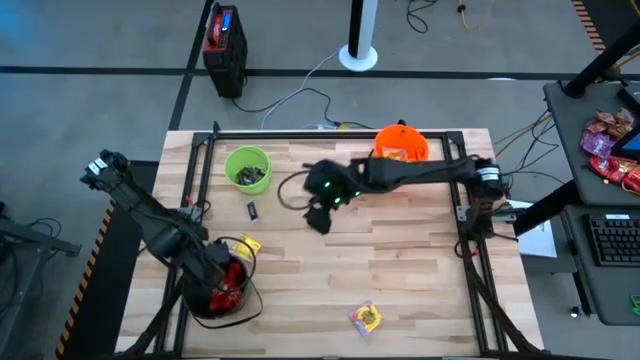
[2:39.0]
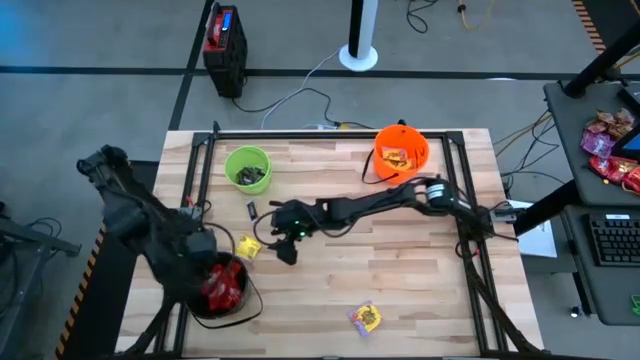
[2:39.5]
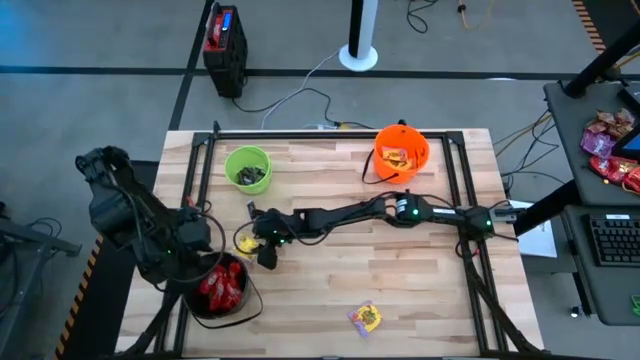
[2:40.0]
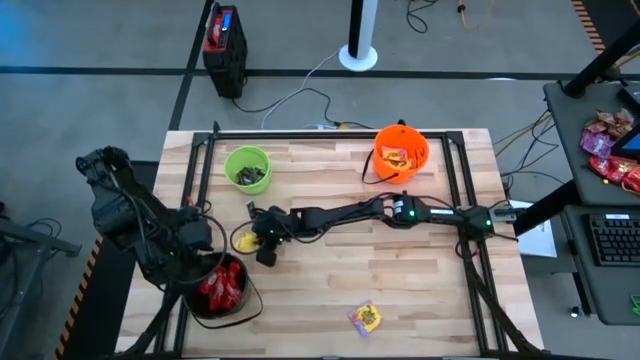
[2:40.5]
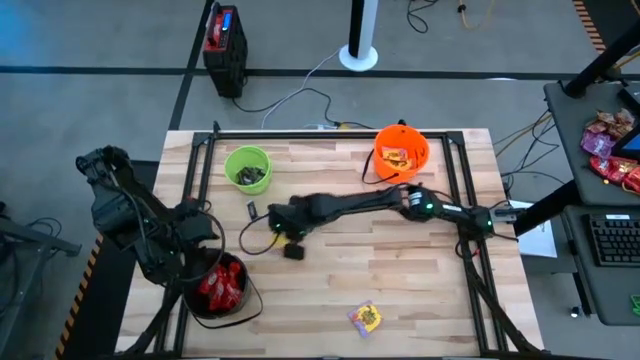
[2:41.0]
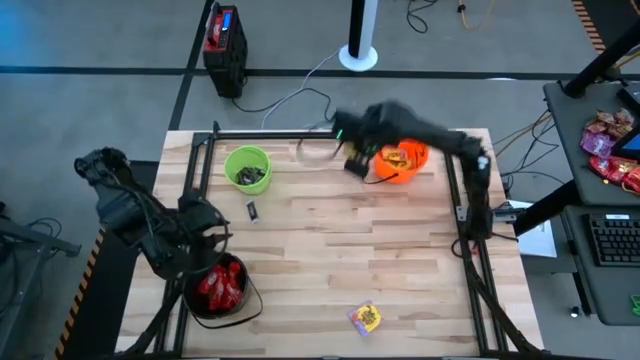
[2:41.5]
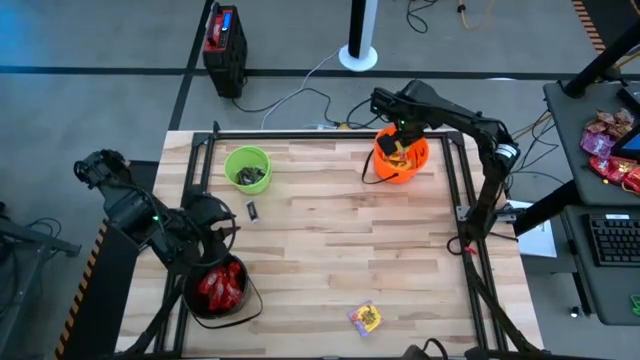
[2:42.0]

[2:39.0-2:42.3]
Task: Sort candy by brand, put in halloween buckets
Put the yellow candy into the orange bucket

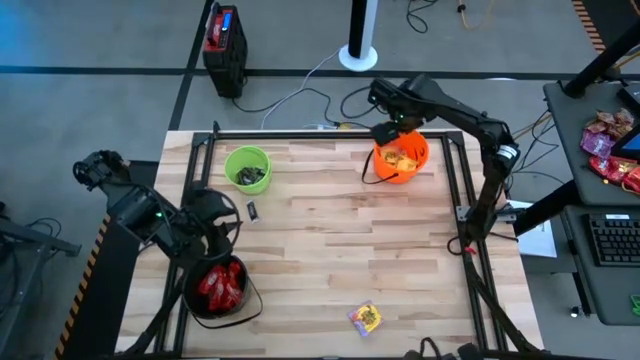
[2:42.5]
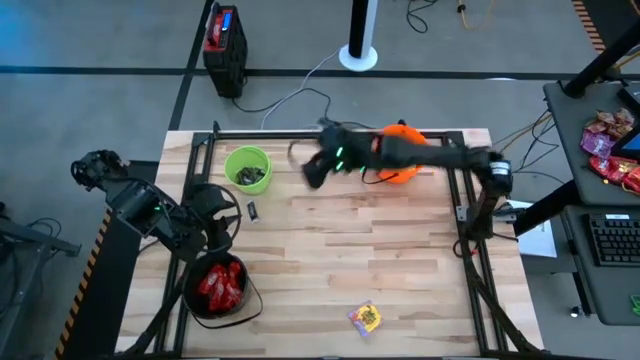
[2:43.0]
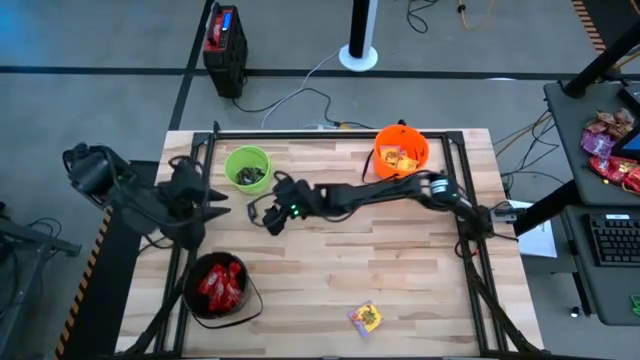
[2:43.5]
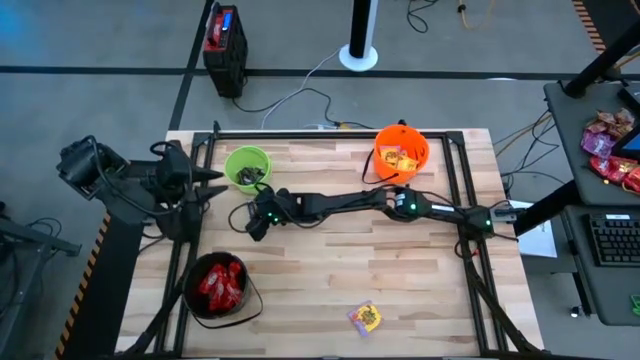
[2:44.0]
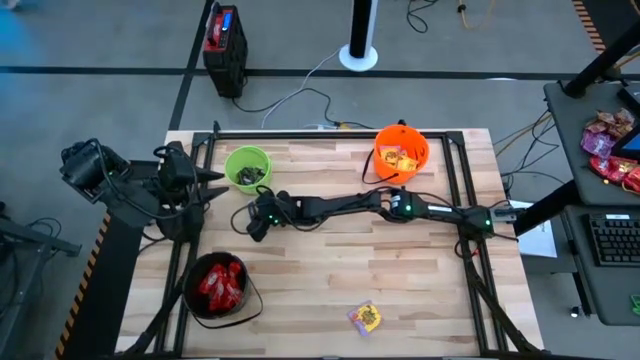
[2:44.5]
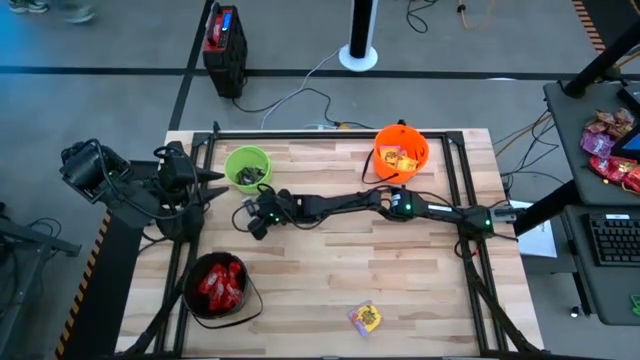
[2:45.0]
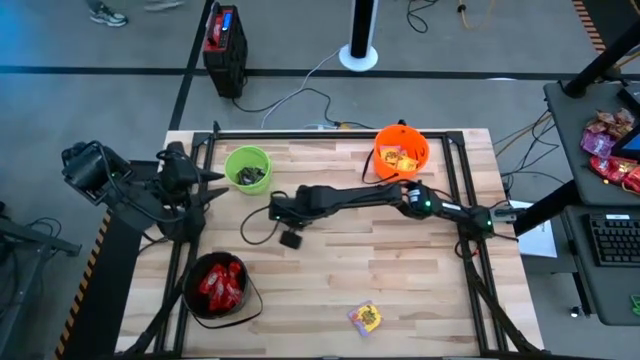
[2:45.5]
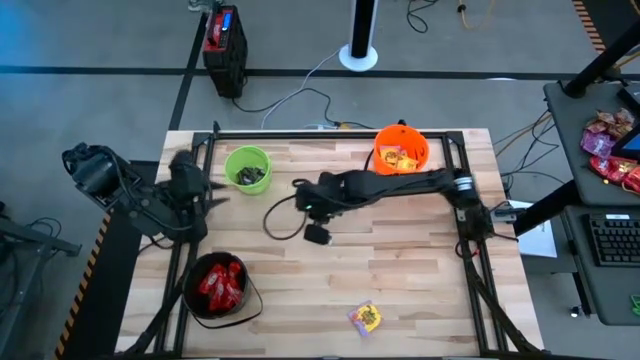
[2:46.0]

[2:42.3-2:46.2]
Put the brown candy into the green bucket

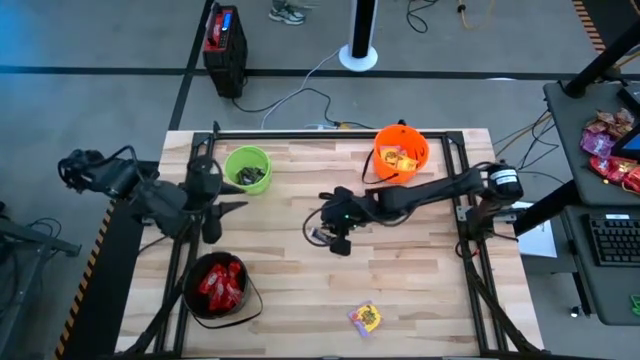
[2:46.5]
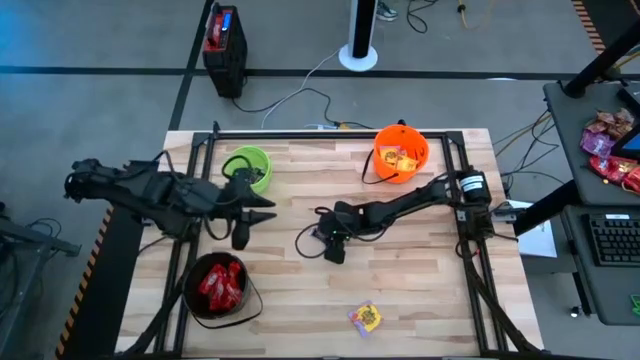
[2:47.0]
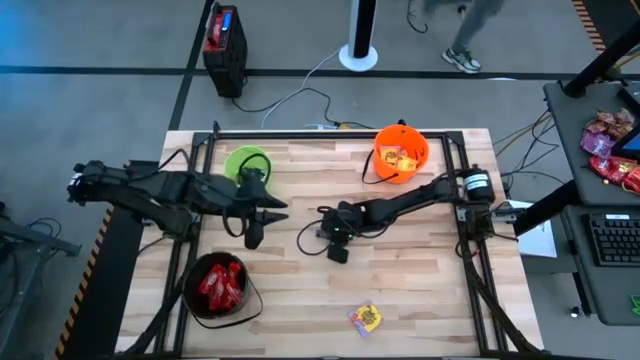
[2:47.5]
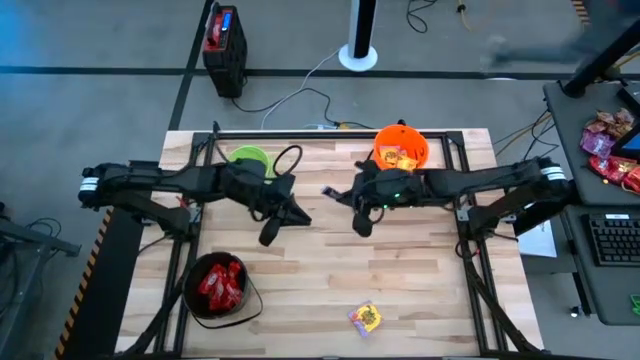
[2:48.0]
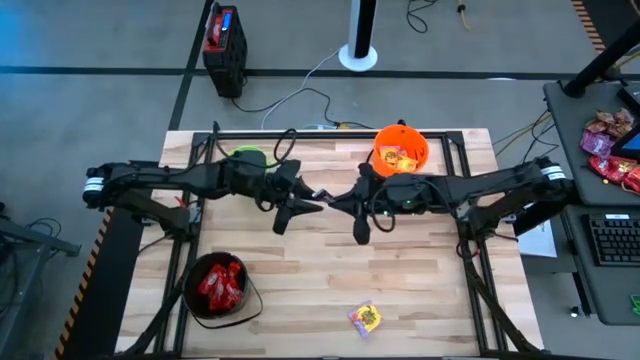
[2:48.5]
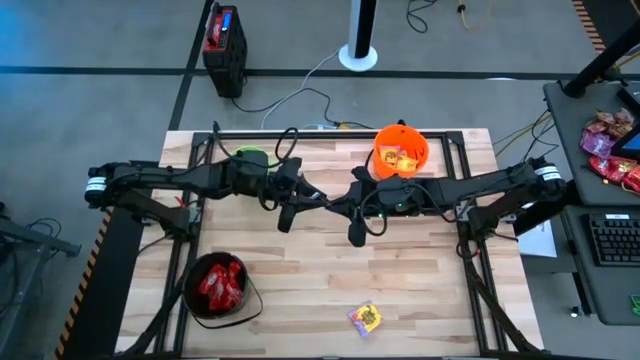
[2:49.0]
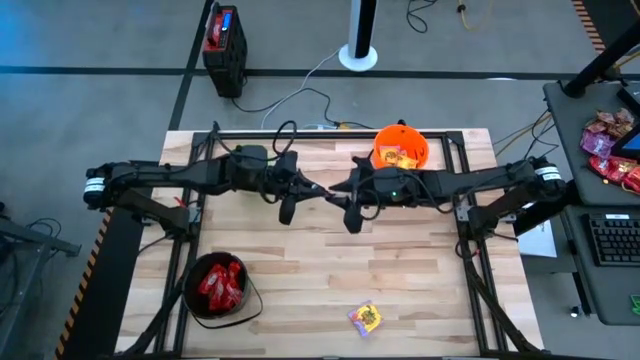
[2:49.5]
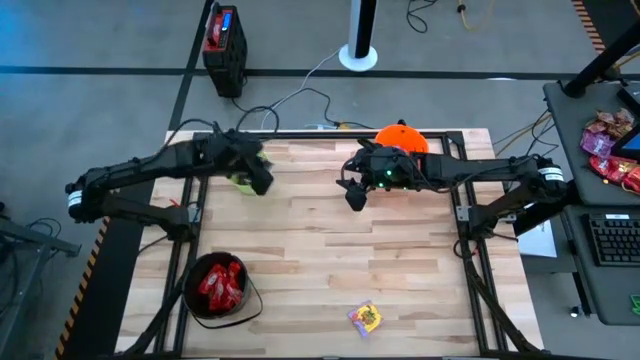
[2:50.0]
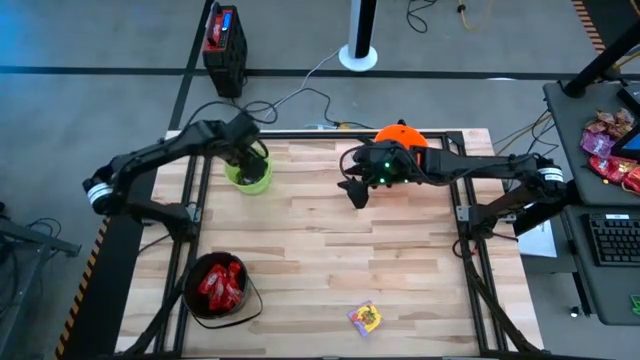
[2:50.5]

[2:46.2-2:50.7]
Put the brown candy into the green bucket

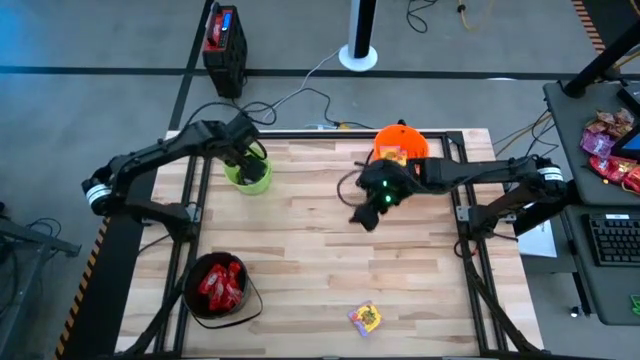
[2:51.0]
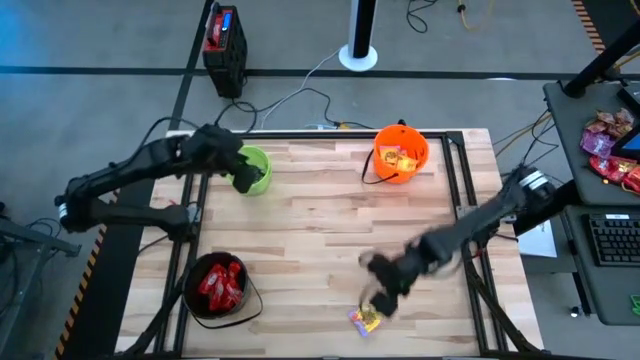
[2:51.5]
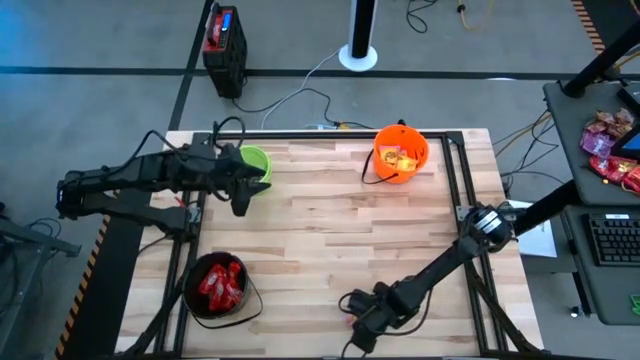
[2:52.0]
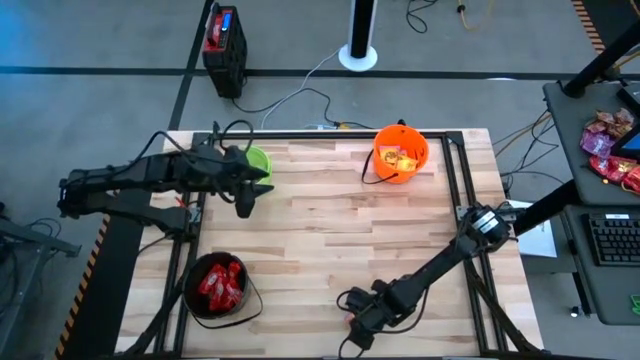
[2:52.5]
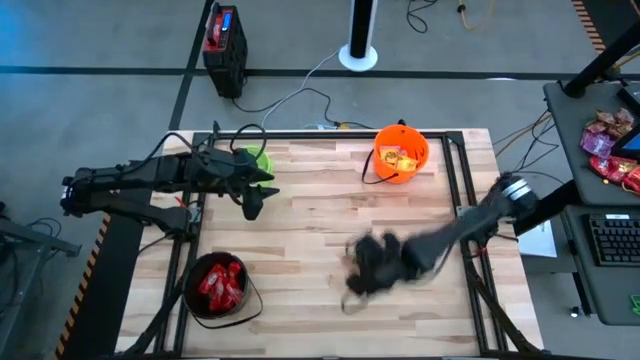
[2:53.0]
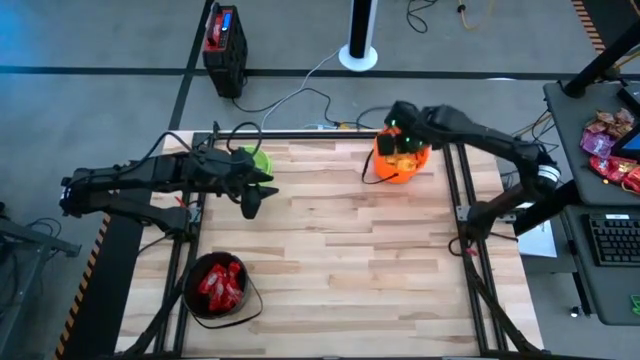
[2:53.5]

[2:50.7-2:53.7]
Put the yellow candy into the orange bucket

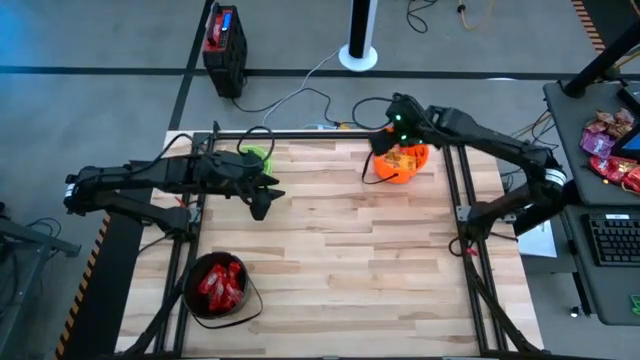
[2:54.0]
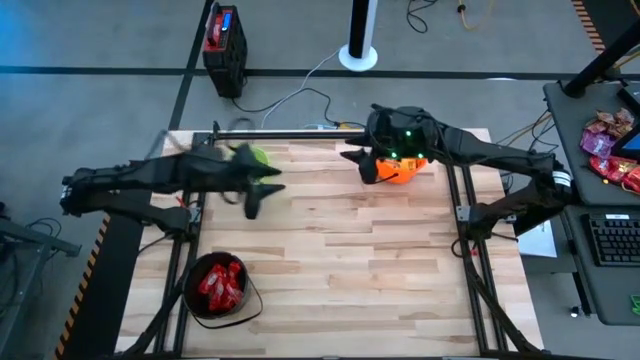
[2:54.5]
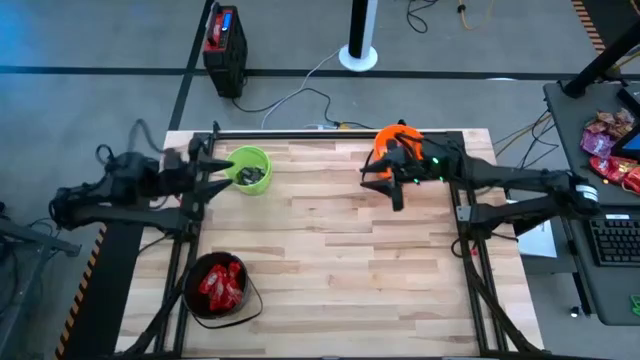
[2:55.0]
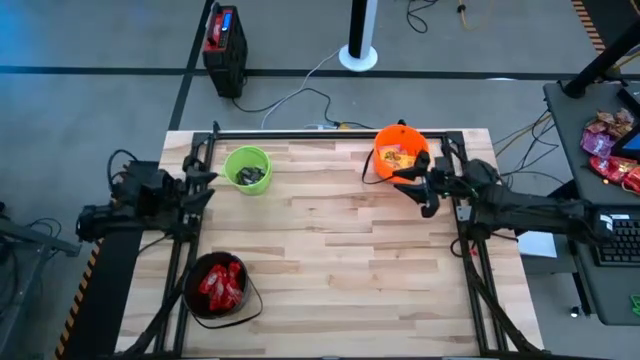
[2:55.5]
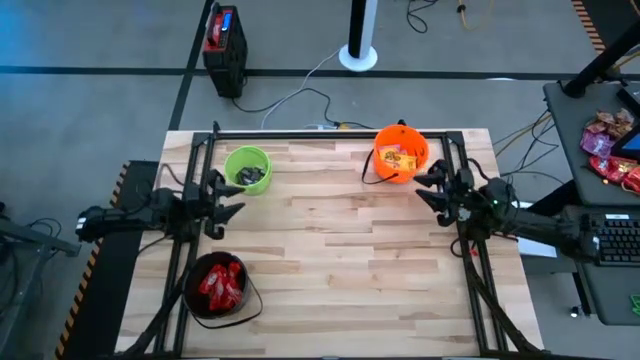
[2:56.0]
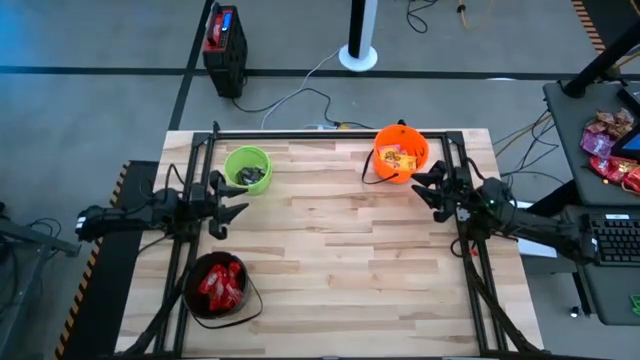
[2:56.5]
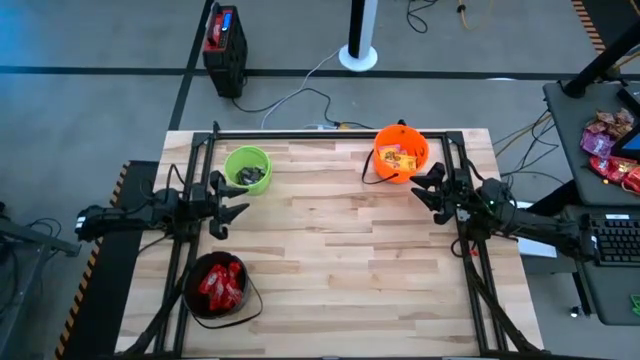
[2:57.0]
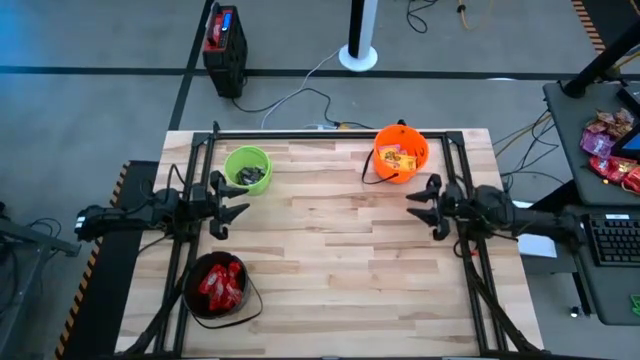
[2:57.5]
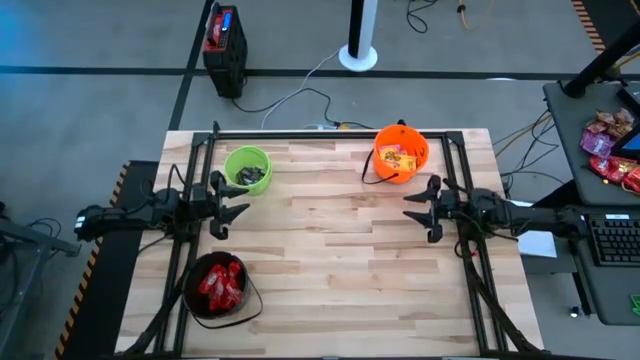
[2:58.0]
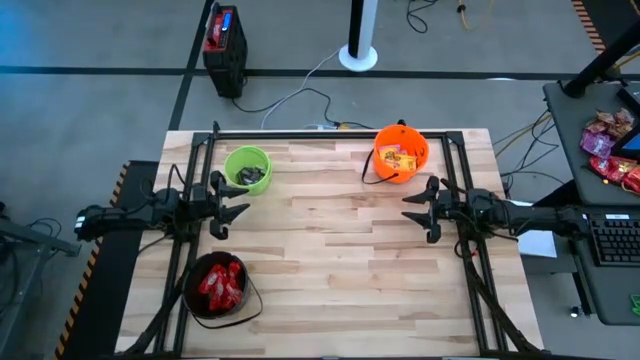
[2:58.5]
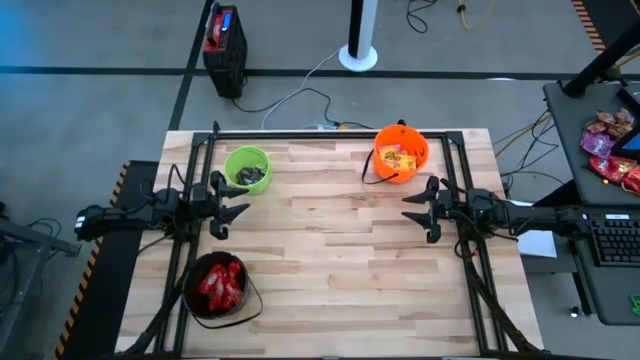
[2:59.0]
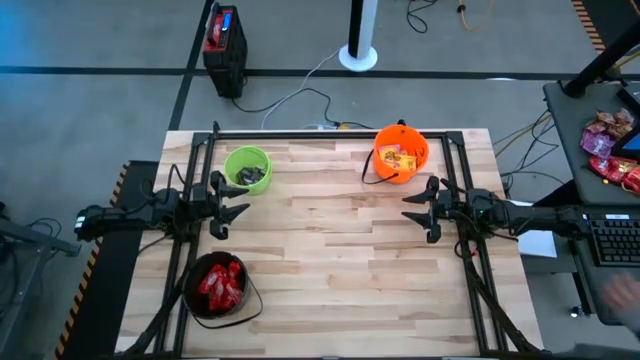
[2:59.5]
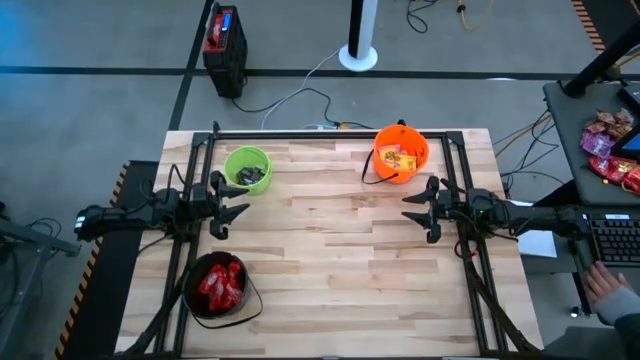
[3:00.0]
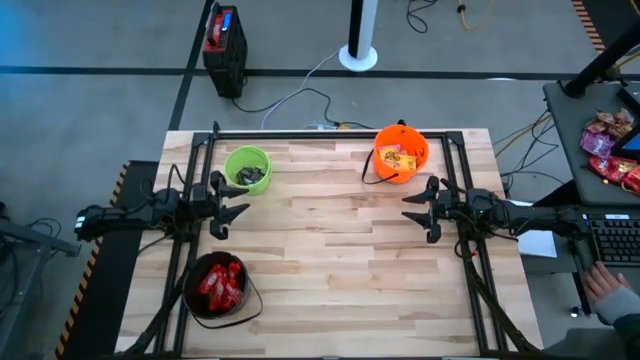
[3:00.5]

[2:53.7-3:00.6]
Return to Home Position
